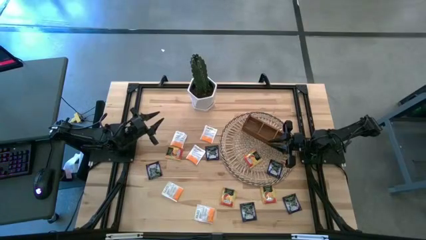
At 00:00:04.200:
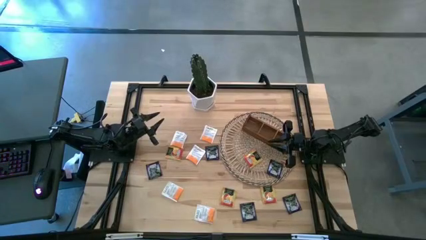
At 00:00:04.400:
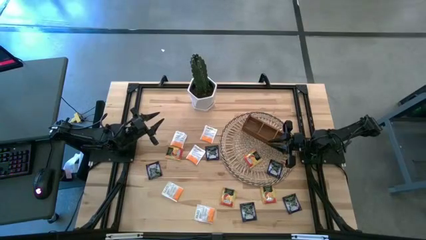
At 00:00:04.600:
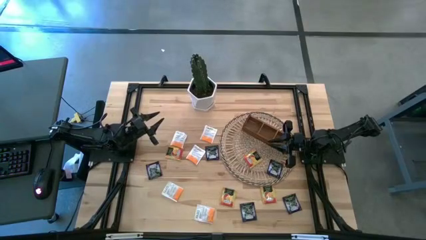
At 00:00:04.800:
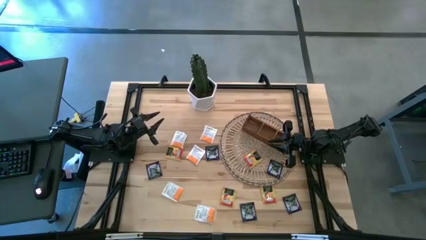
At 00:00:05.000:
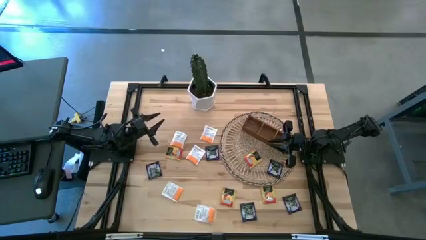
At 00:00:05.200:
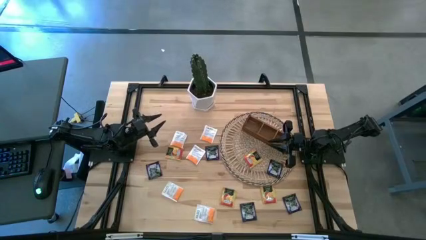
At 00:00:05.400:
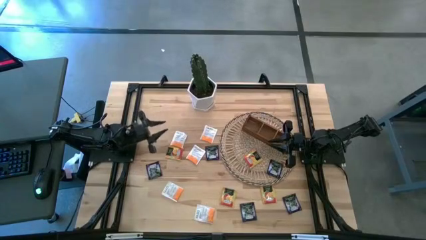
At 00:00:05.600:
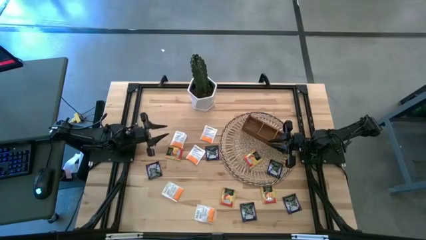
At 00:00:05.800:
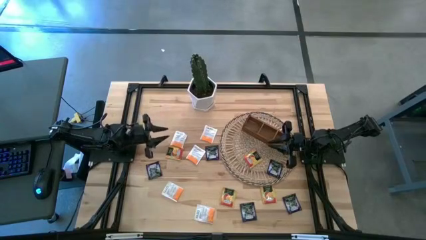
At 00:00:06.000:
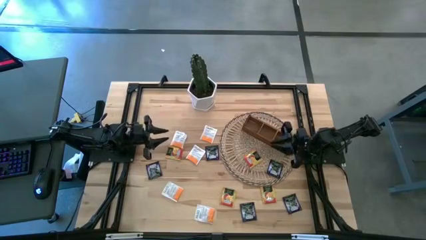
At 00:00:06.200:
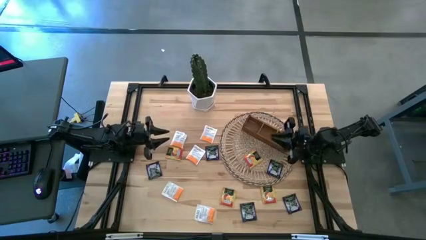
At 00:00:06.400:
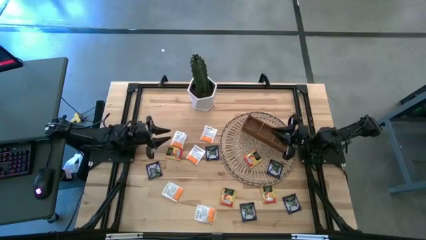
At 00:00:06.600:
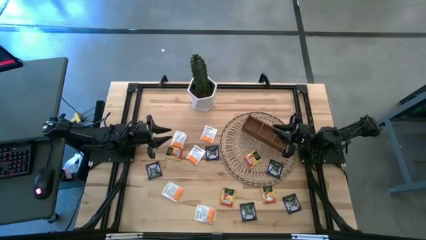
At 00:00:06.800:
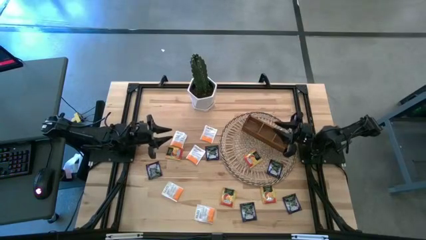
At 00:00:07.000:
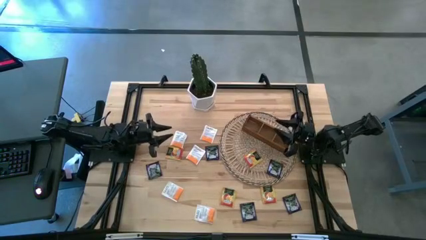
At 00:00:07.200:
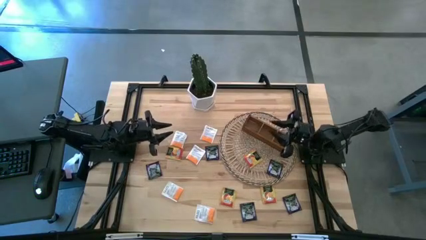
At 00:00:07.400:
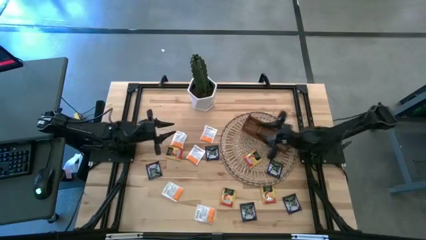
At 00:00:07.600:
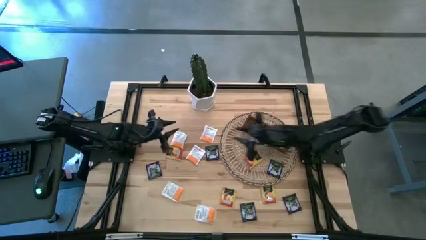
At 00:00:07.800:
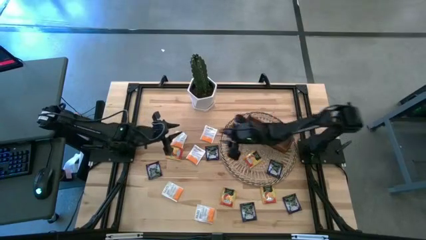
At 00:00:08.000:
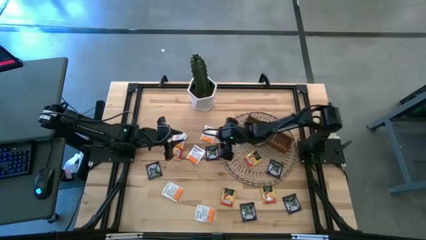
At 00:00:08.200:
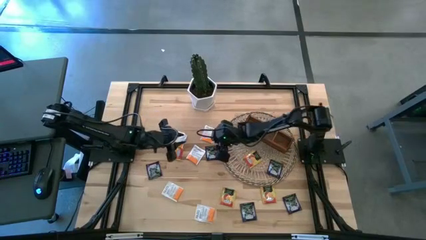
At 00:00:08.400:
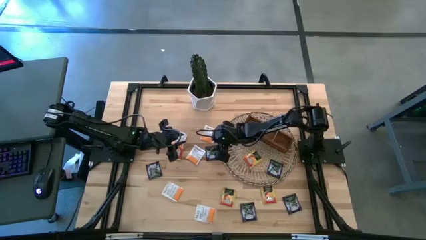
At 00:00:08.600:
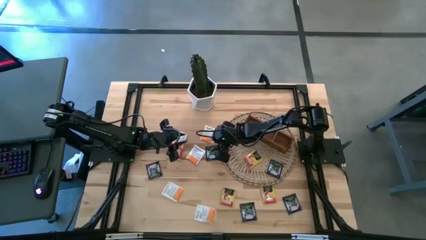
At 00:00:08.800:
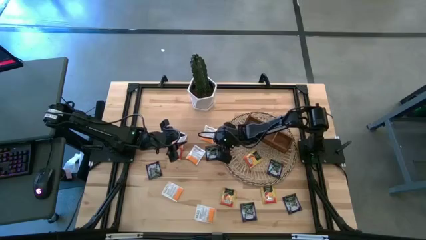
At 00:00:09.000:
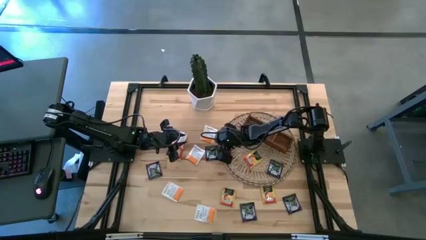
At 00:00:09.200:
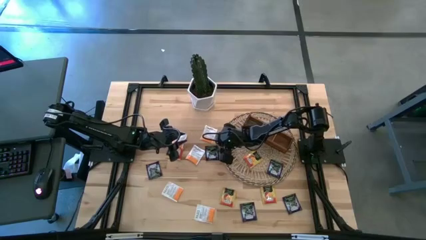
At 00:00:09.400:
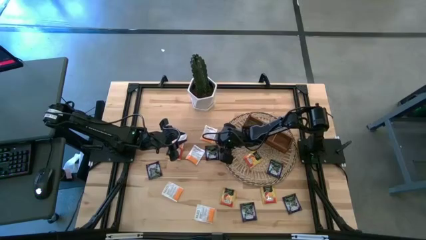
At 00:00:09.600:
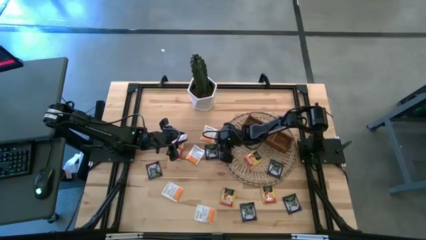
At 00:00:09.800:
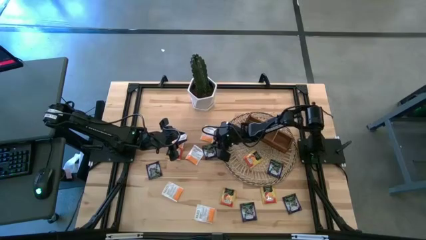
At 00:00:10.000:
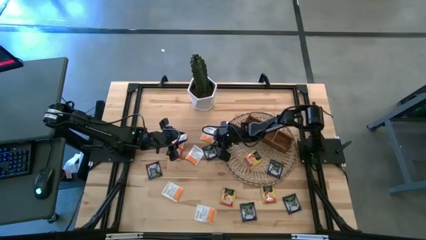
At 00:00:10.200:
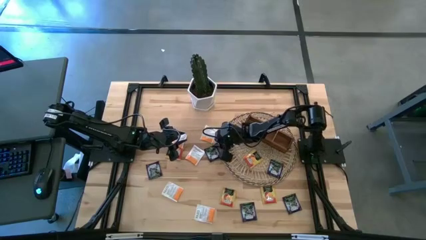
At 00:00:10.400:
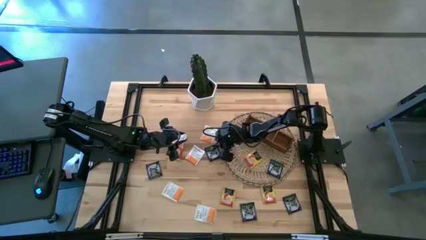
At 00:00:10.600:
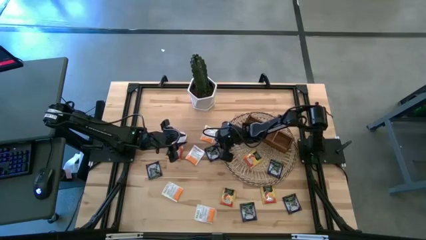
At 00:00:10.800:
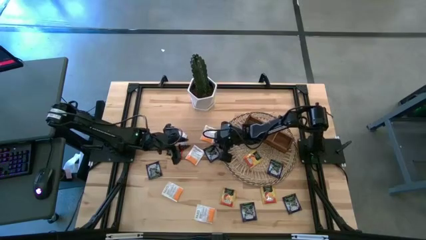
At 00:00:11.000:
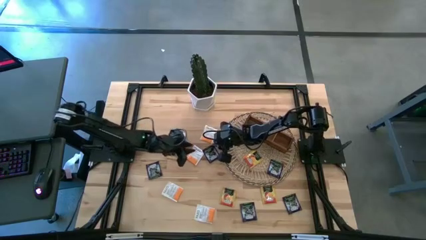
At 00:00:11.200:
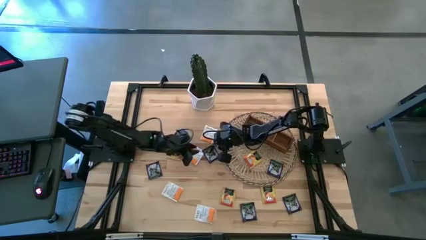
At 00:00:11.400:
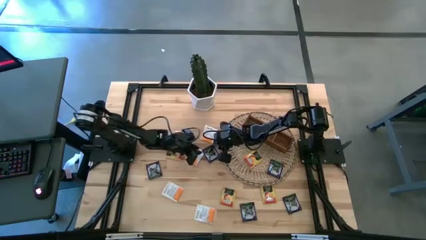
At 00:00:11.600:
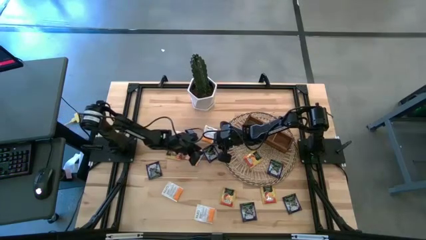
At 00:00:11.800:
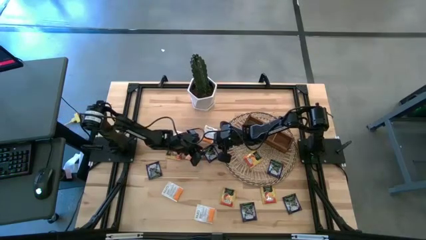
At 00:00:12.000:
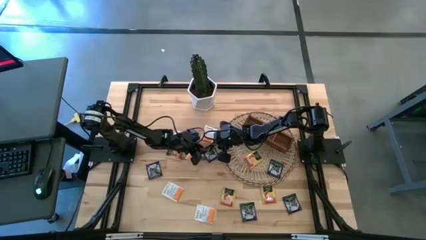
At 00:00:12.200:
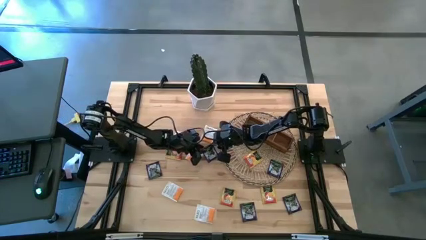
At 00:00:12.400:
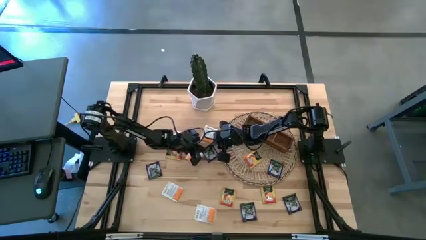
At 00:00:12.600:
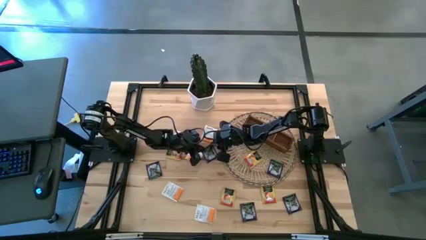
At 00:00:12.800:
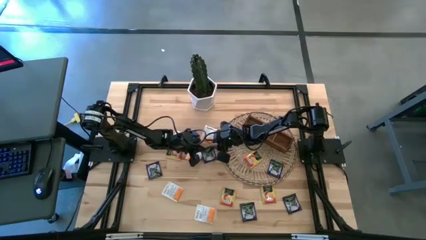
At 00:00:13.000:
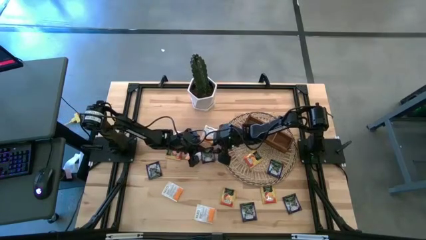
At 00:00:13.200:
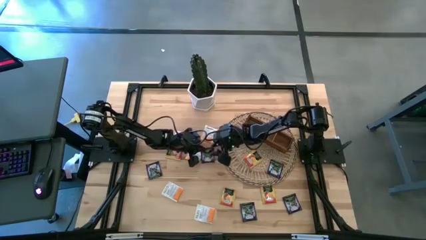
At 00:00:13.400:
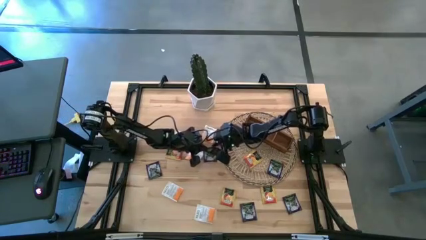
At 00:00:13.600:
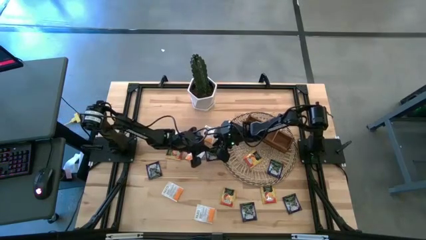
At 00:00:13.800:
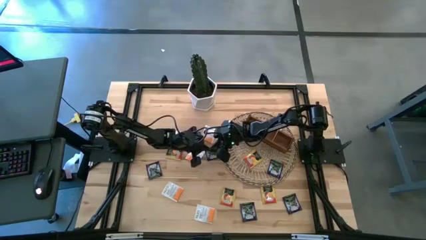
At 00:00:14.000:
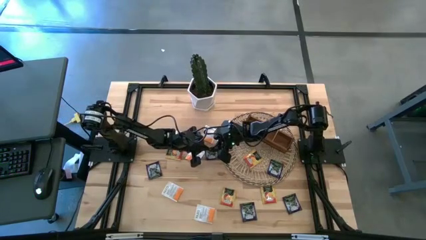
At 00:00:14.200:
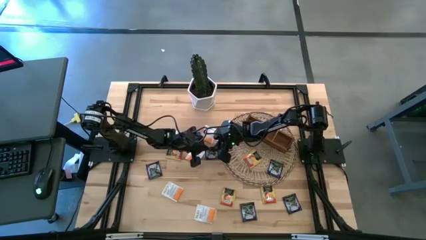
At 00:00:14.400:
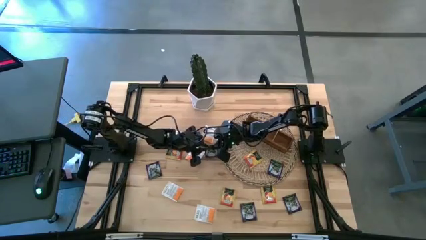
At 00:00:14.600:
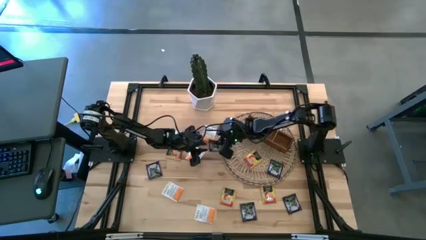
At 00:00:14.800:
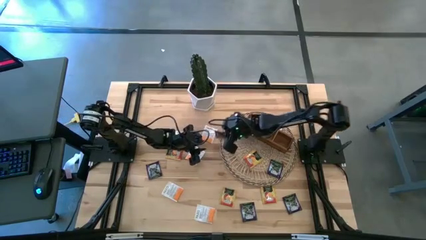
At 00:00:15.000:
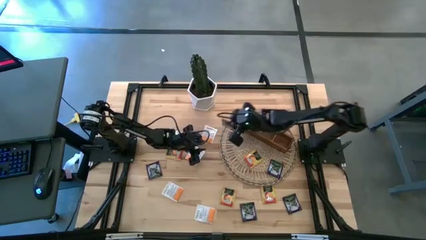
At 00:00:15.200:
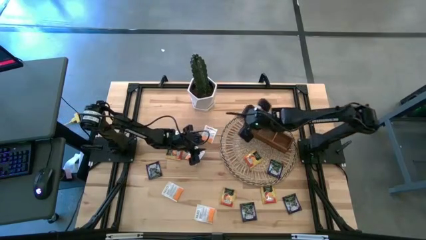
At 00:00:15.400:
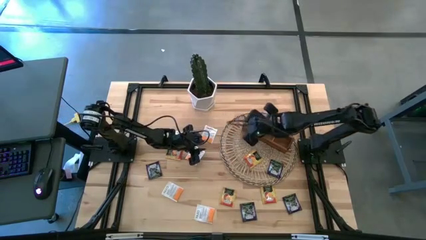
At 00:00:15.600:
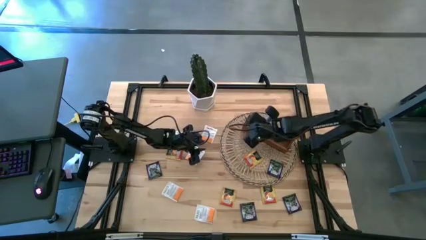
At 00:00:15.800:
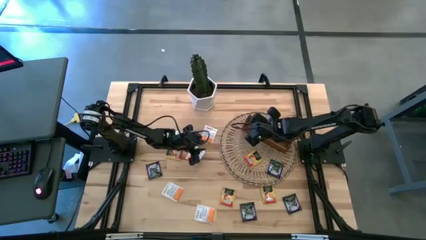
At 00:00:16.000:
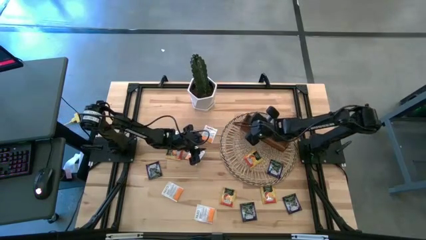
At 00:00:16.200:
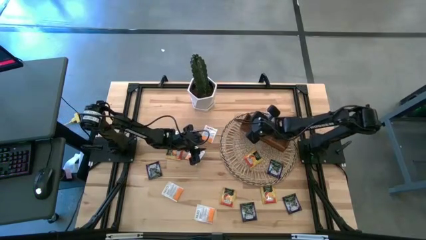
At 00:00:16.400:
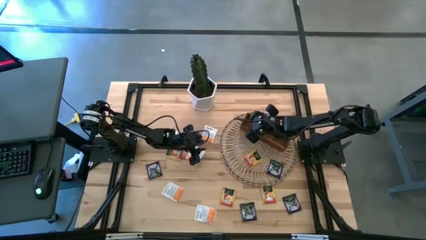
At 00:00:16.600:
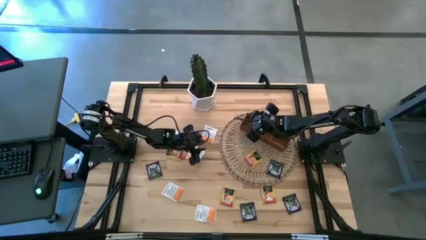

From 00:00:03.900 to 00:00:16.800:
Task: Pick & Place Tea
Put the purple tea bag into the left section of the wooden organizer

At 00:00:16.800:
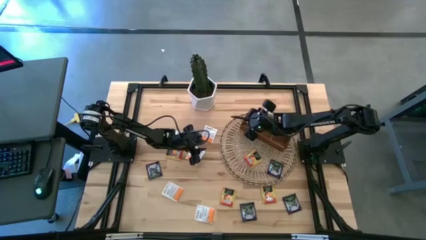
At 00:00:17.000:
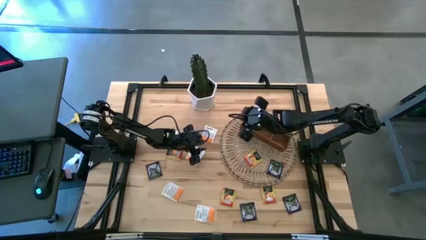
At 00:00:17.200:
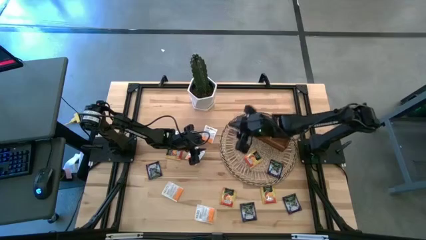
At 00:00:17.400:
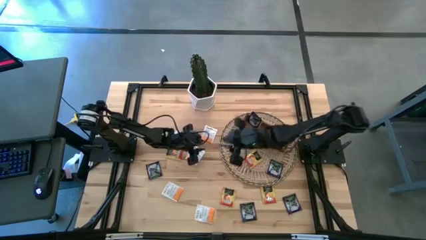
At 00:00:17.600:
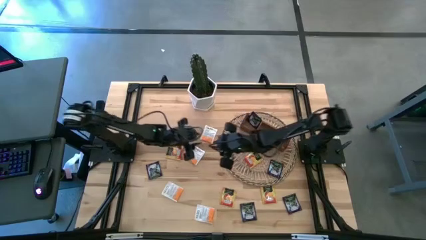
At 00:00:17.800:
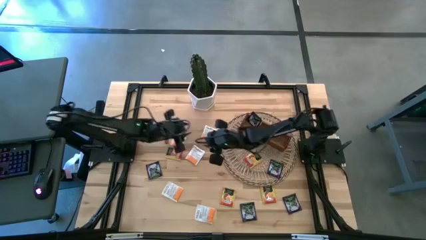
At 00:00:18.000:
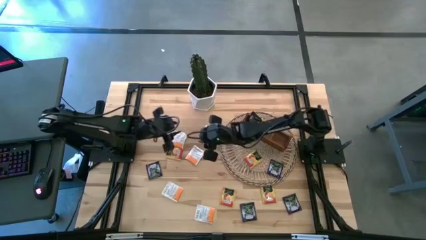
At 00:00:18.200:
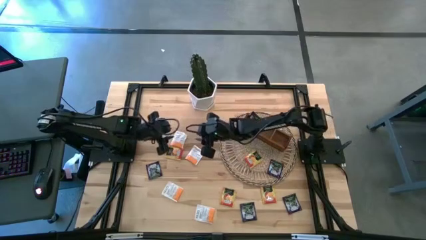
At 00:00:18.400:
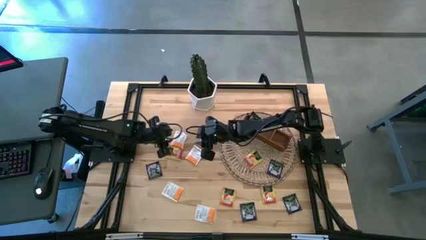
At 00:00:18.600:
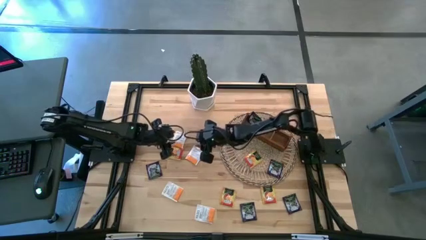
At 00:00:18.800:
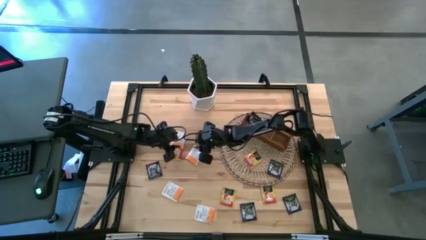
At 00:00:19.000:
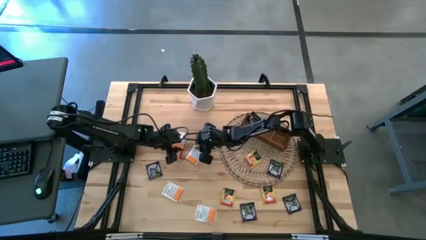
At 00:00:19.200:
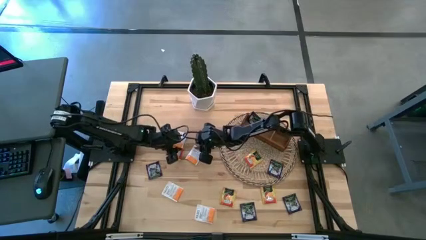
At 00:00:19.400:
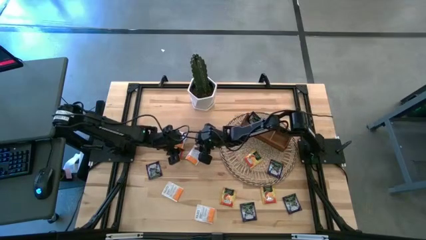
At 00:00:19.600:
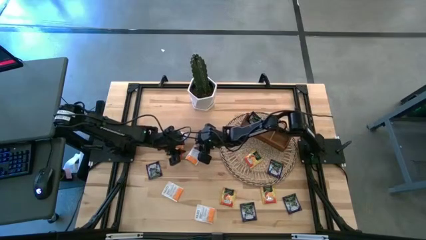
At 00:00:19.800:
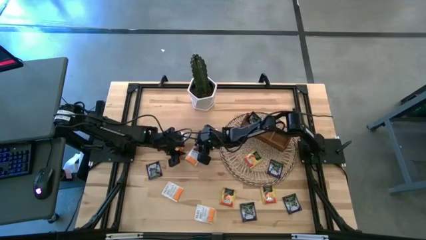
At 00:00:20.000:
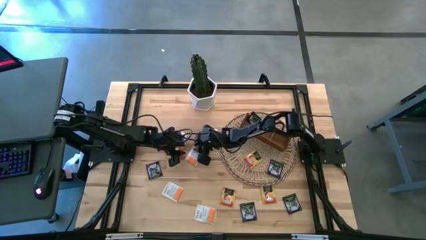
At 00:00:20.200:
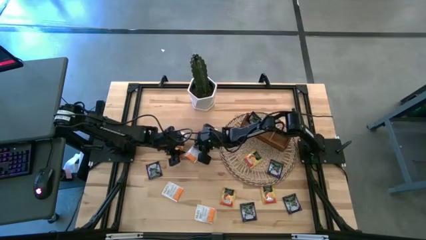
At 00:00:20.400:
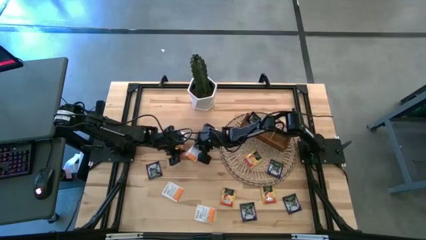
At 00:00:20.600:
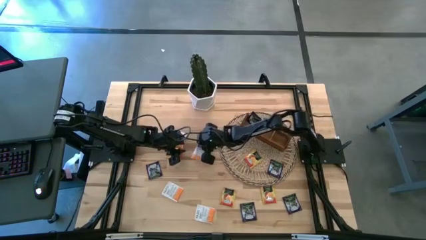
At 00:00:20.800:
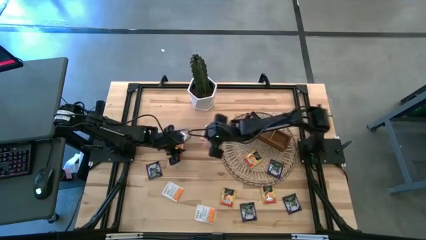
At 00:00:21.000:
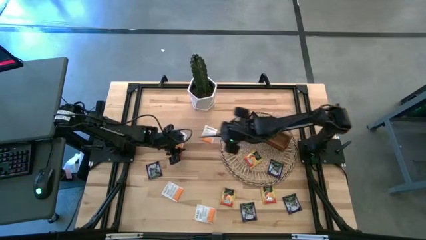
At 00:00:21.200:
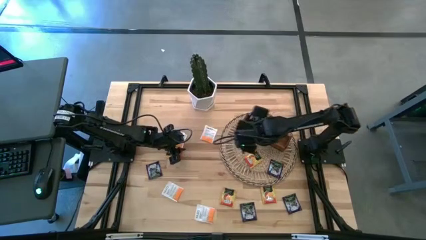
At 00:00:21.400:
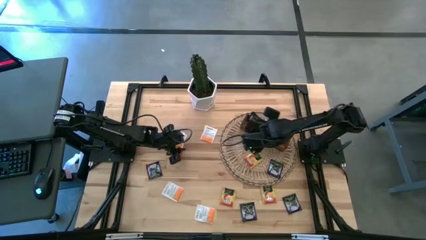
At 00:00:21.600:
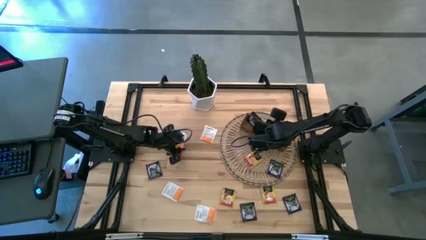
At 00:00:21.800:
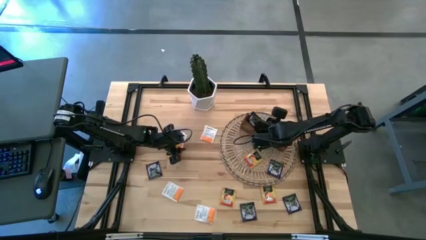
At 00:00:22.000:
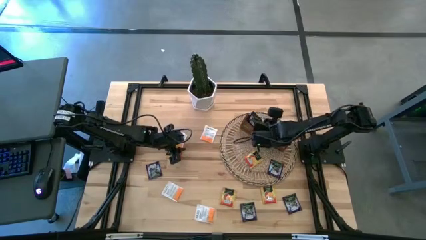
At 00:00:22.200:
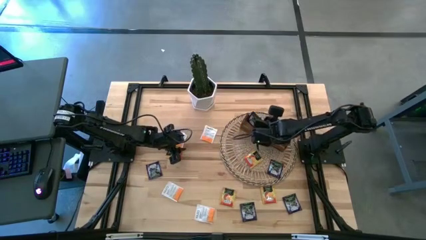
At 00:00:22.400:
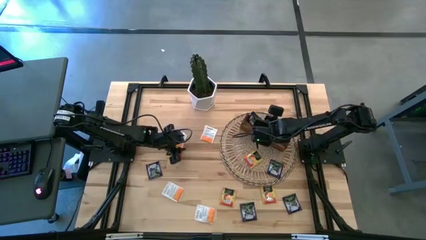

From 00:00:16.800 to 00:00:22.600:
Put the white tea bag into the middle section of the wooden organizer
